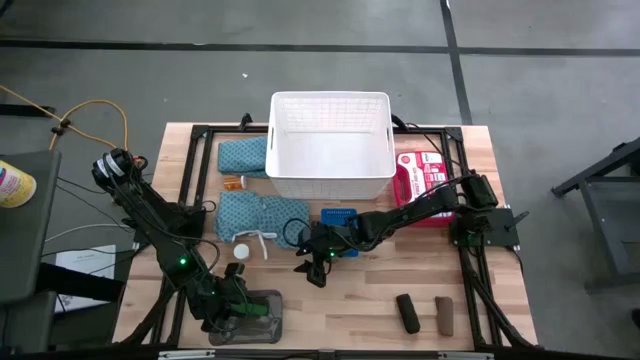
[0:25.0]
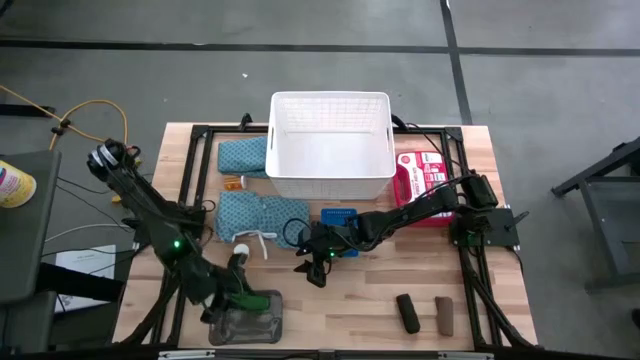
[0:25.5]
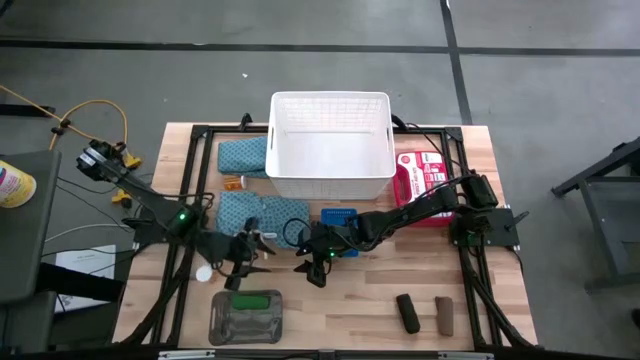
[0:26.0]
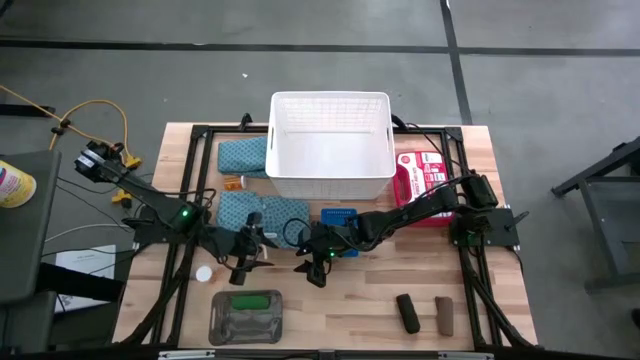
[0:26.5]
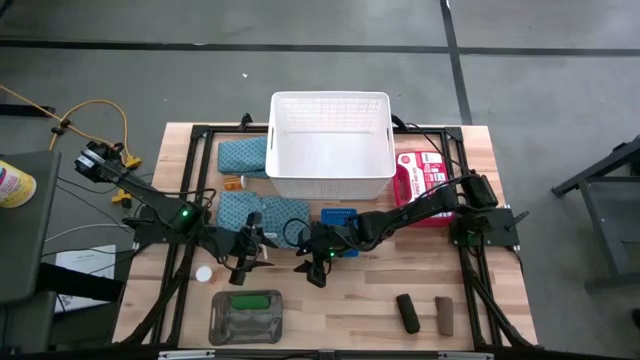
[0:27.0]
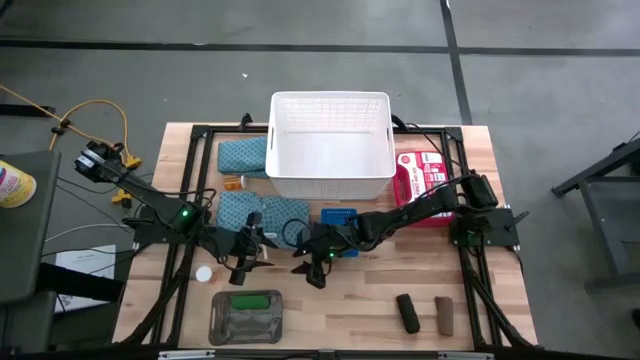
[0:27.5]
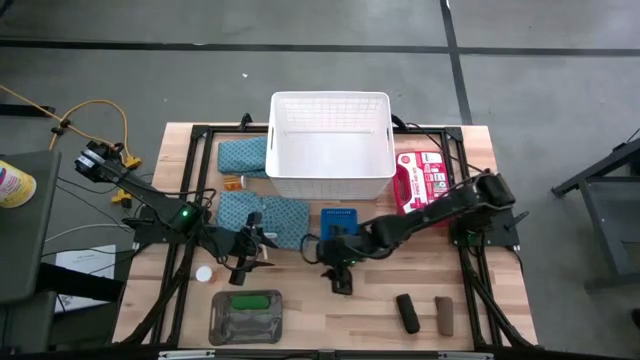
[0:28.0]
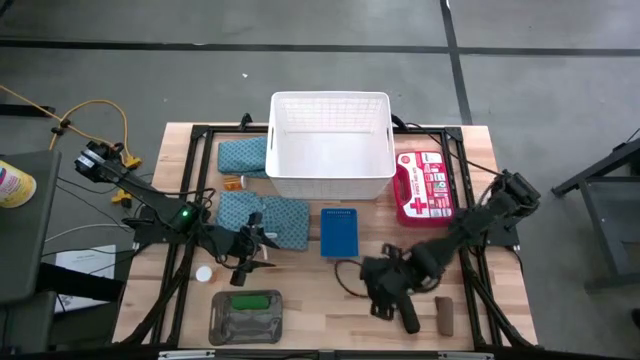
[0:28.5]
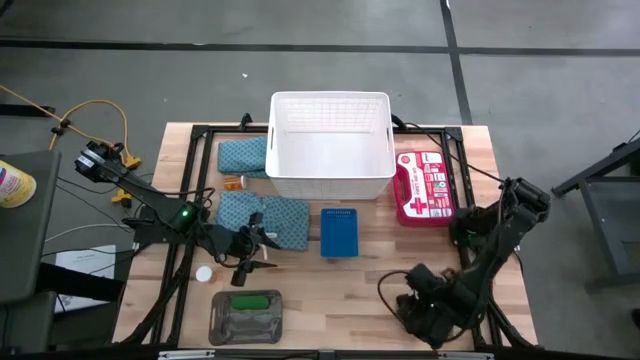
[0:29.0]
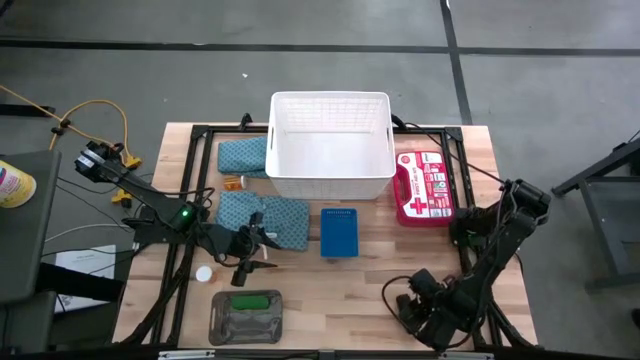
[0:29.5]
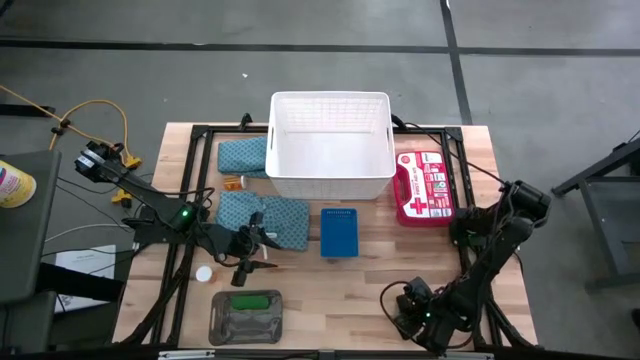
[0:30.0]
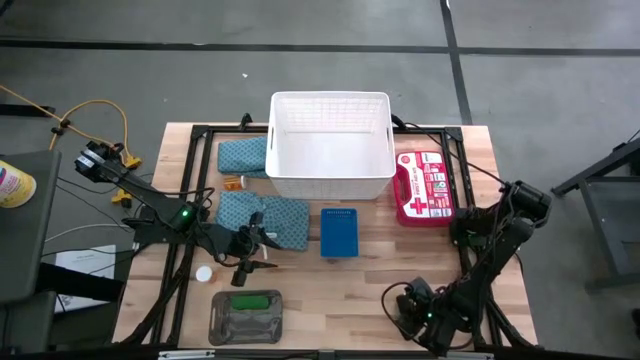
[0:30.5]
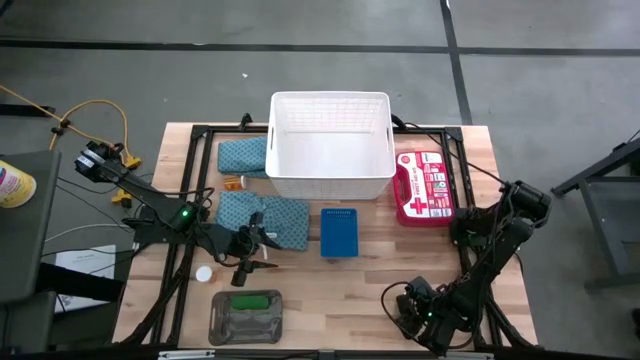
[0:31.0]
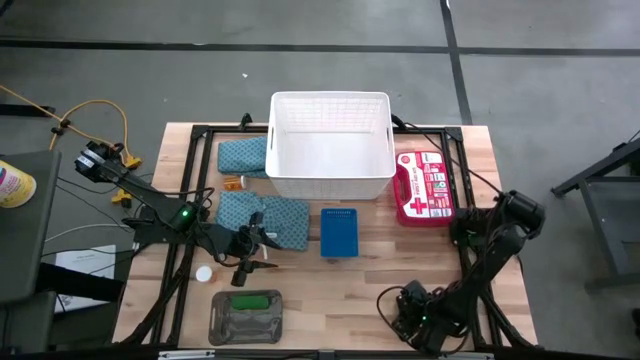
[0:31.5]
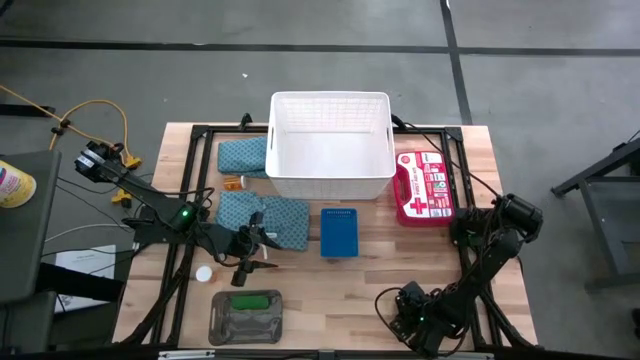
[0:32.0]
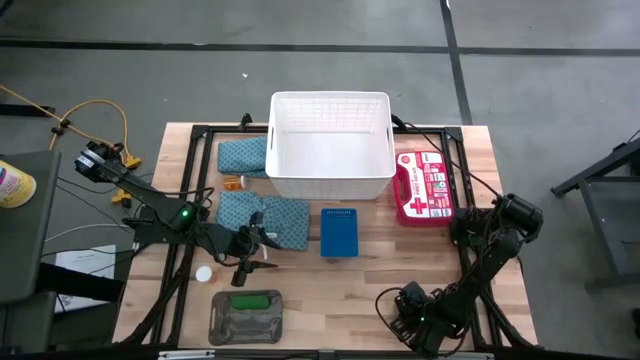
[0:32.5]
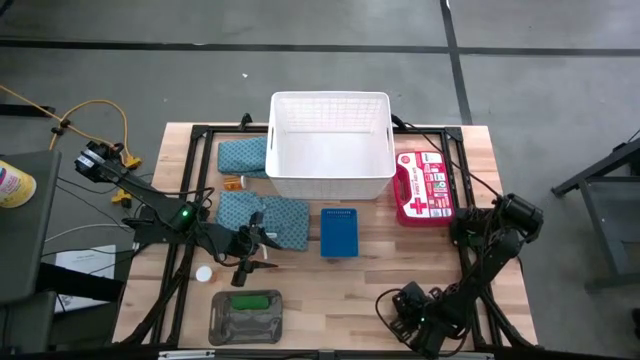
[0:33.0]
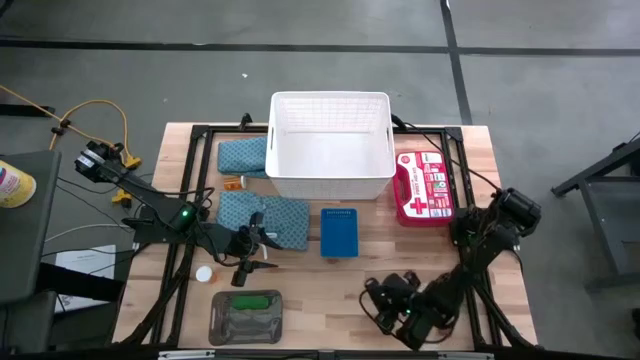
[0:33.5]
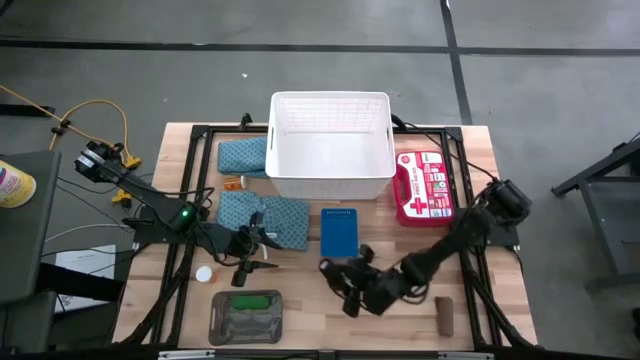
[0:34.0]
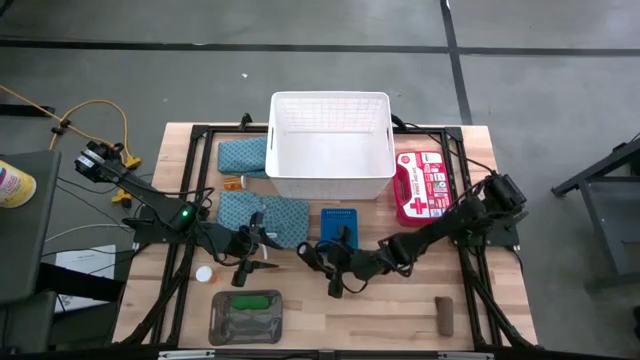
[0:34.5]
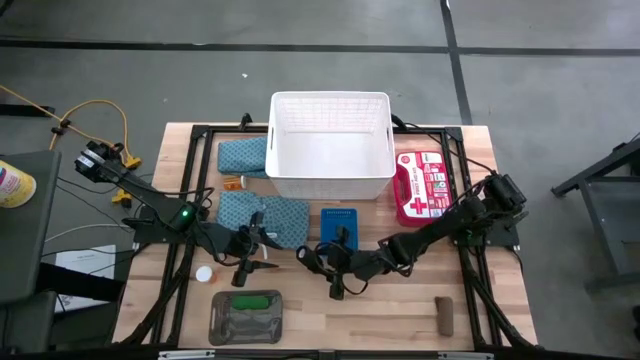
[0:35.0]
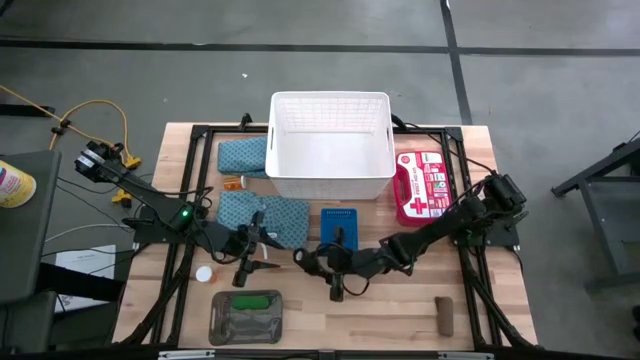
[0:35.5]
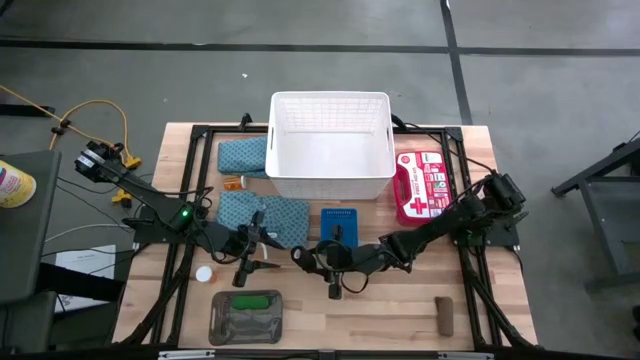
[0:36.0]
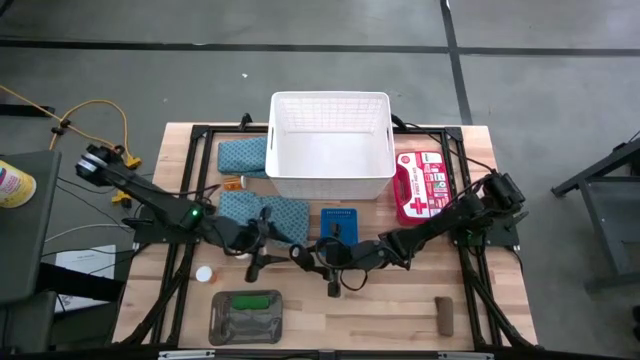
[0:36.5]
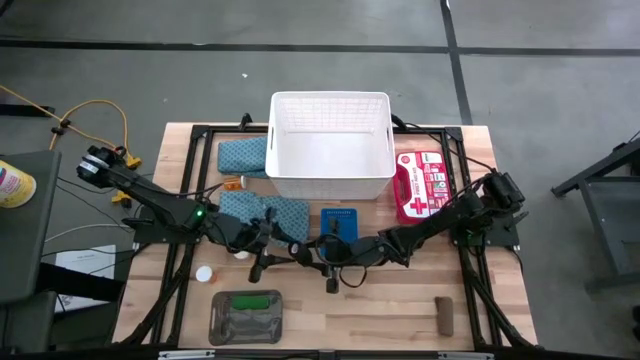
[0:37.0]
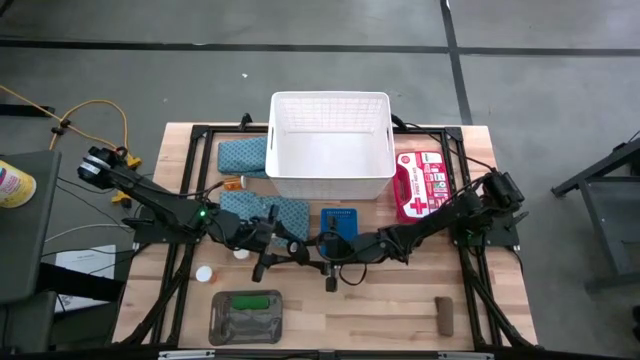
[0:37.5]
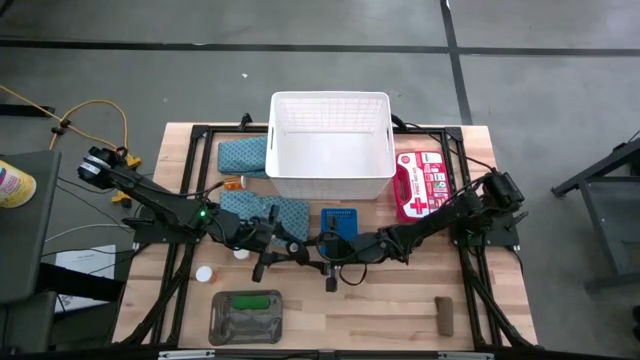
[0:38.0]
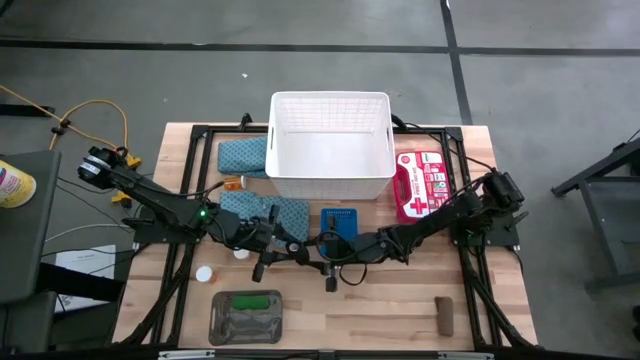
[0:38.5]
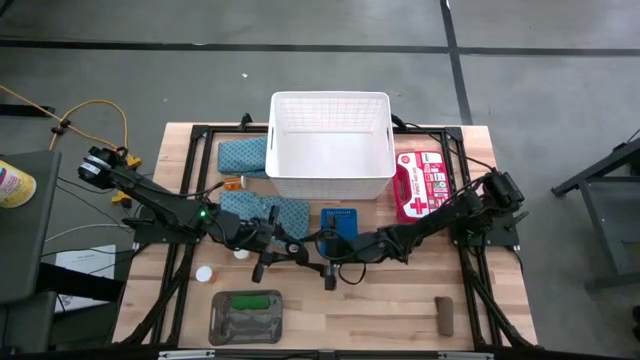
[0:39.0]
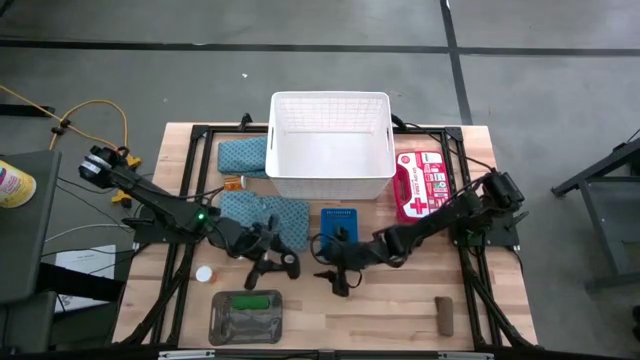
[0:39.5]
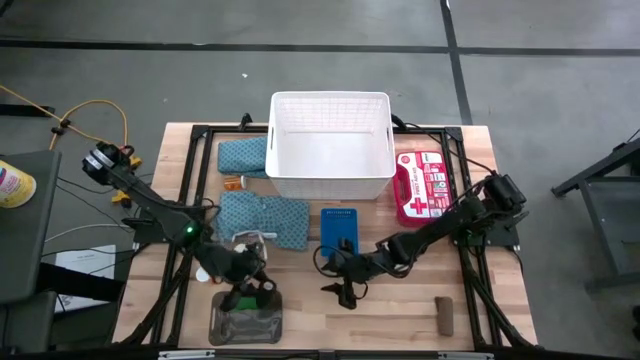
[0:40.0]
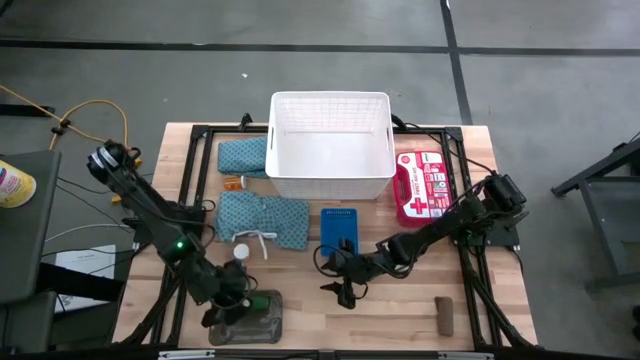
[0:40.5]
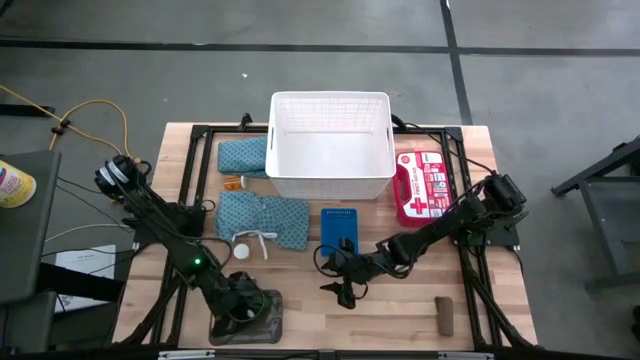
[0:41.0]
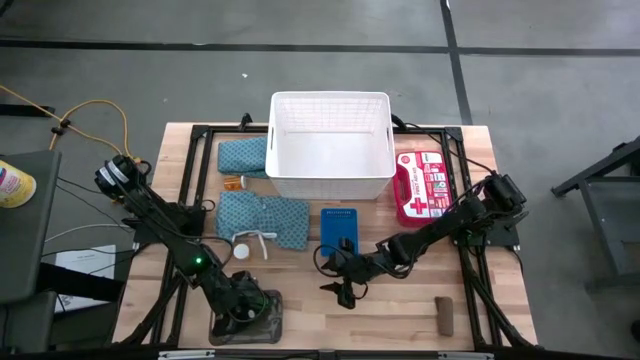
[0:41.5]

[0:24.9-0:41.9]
Task: Pick & place medical supplies in basket/bin
Put the black bandage into the transparent black bin

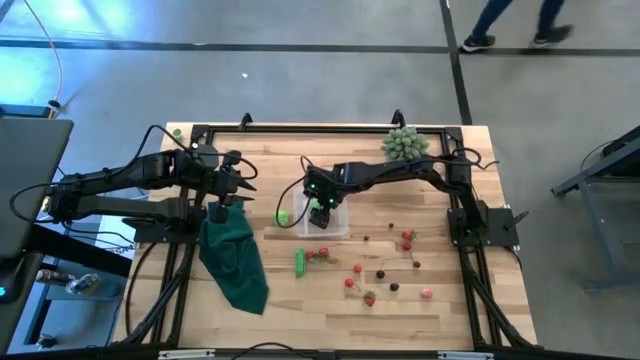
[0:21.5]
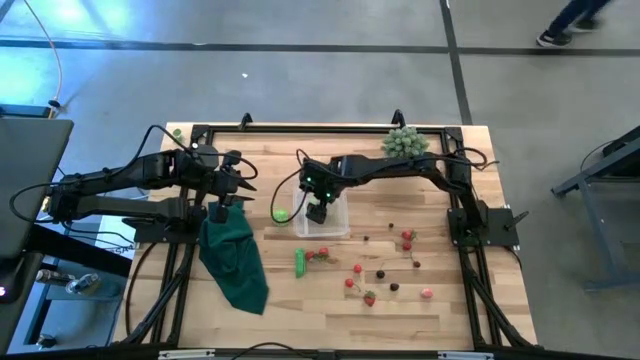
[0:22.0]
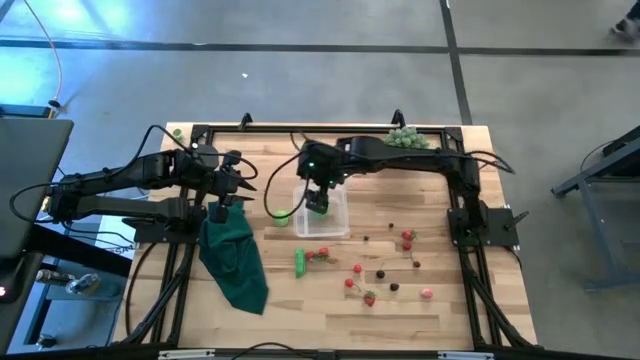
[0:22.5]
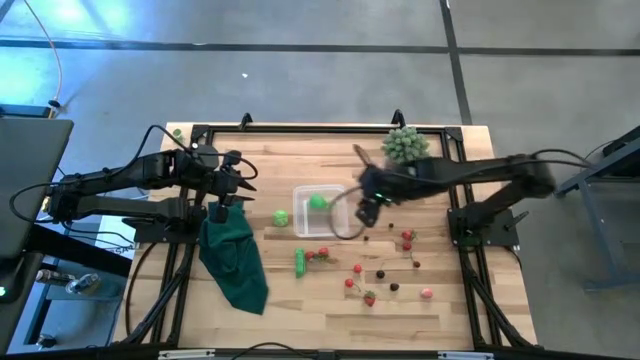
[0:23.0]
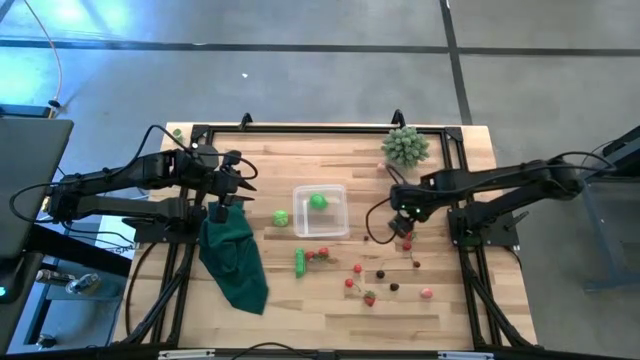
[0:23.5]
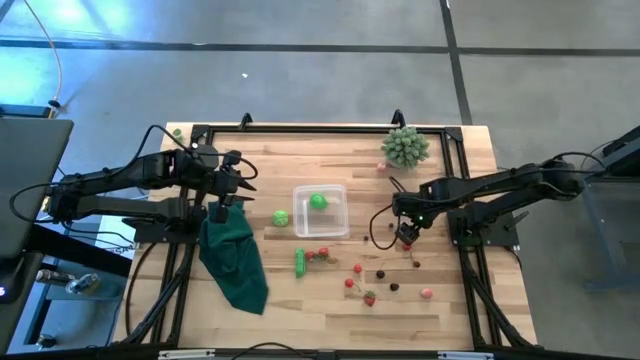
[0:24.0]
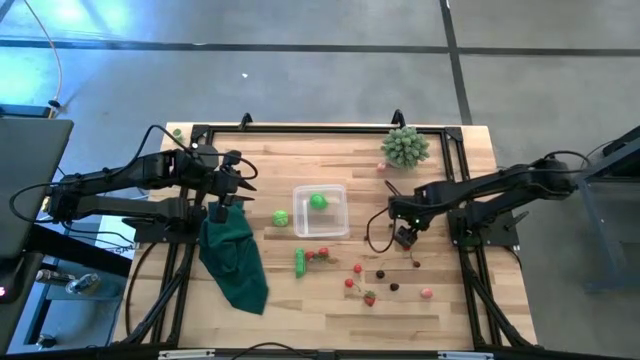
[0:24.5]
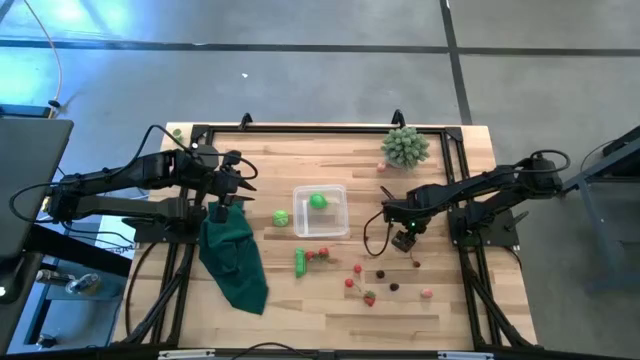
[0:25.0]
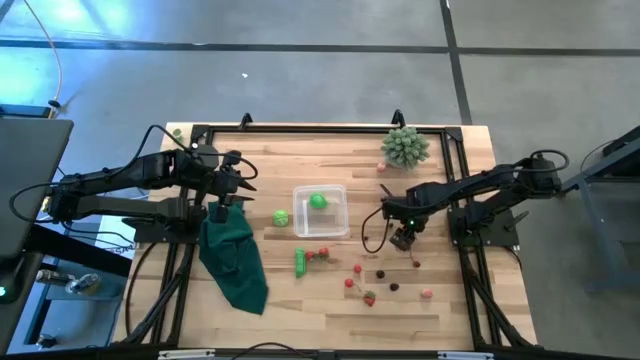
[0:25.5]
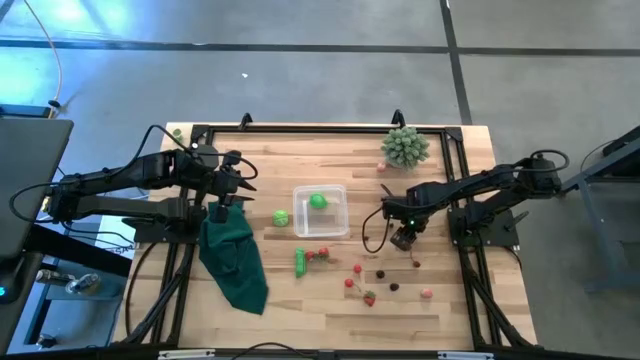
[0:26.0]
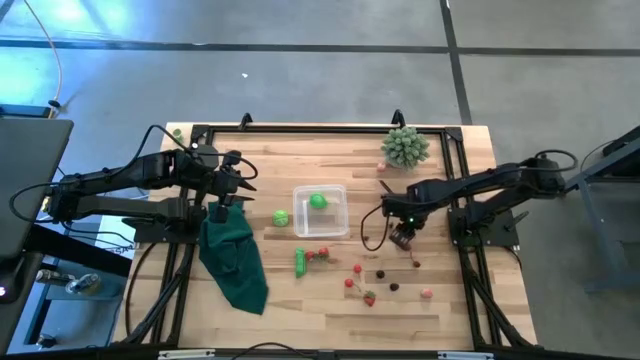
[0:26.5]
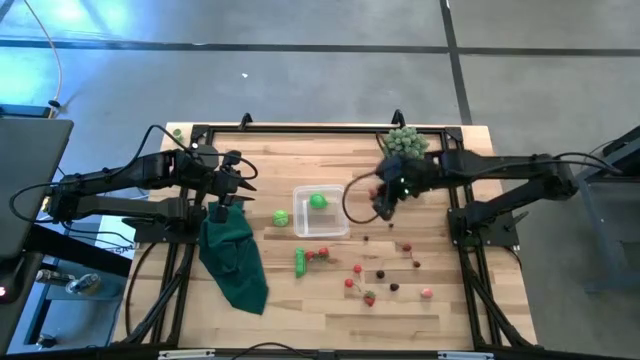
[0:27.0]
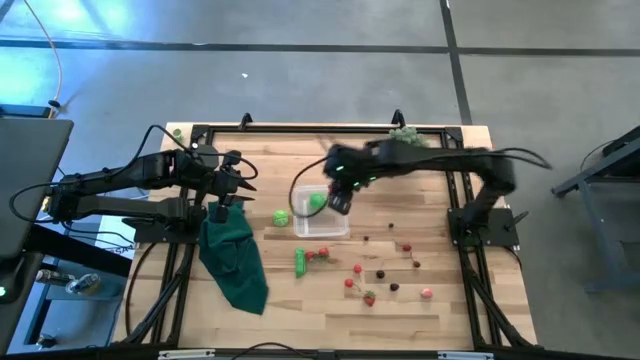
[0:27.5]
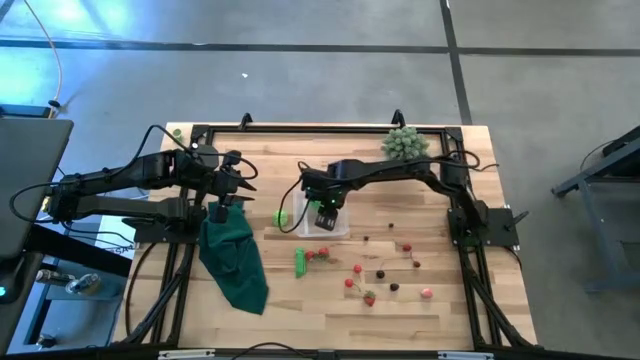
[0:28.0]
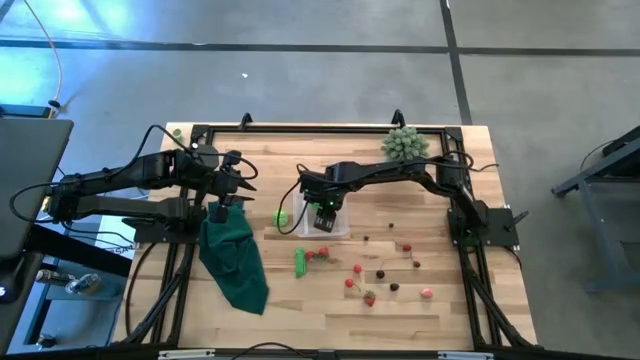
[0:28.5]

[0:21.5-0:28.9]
Task: Pick and placing Produce into tupperware
Put the strawberry into the transparent bin
